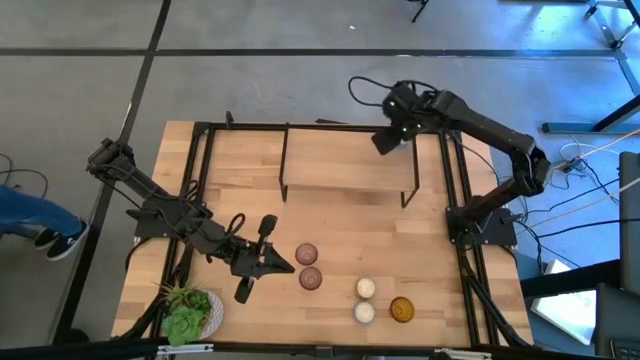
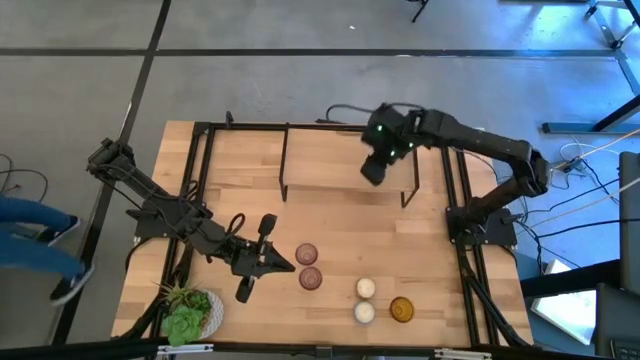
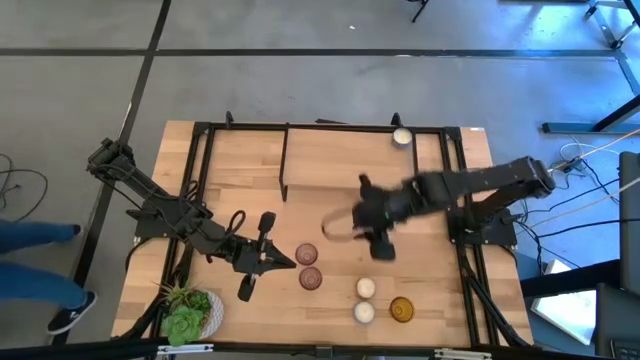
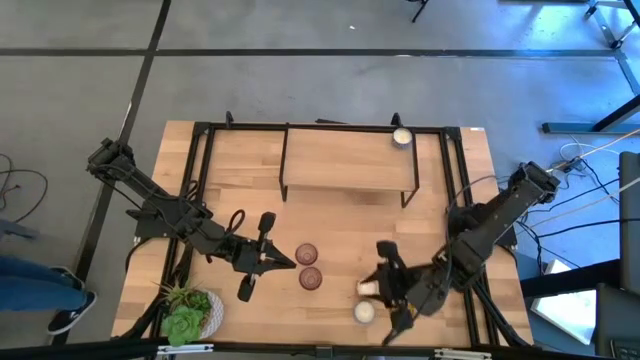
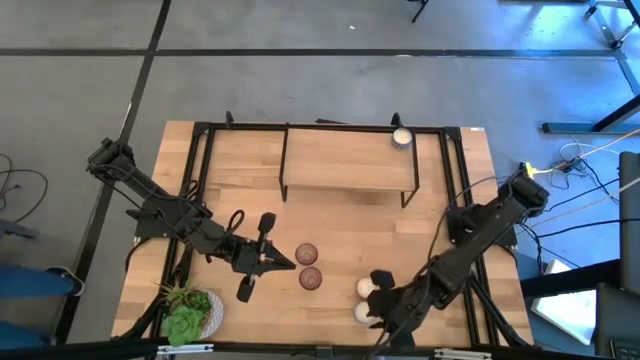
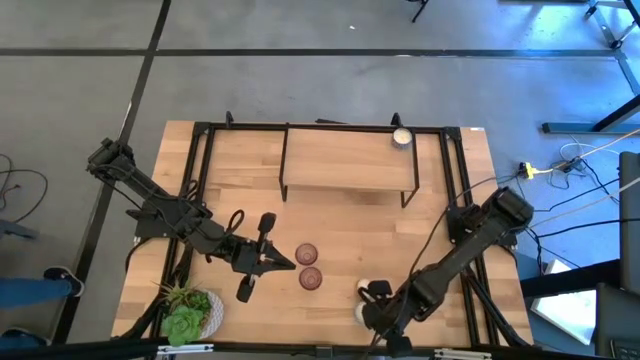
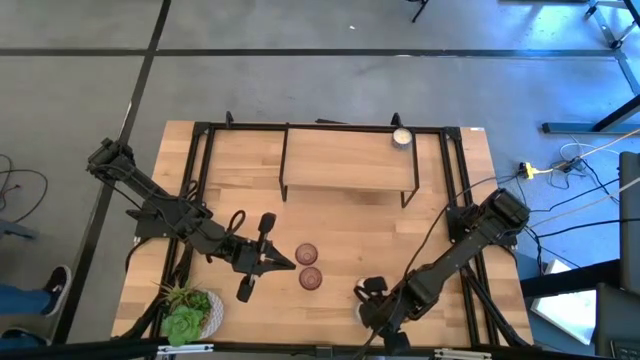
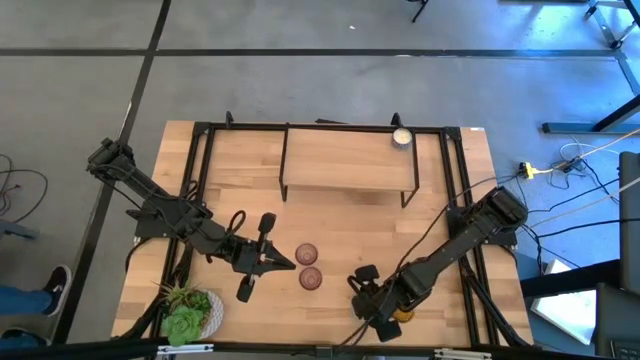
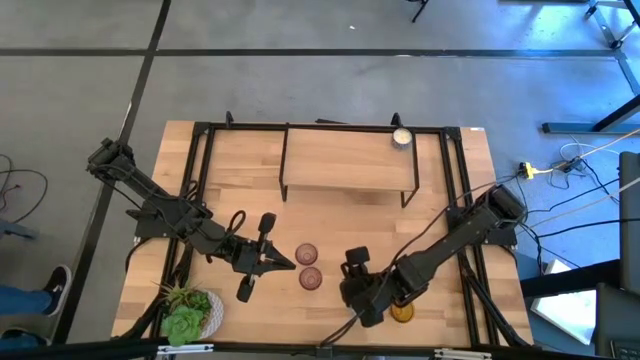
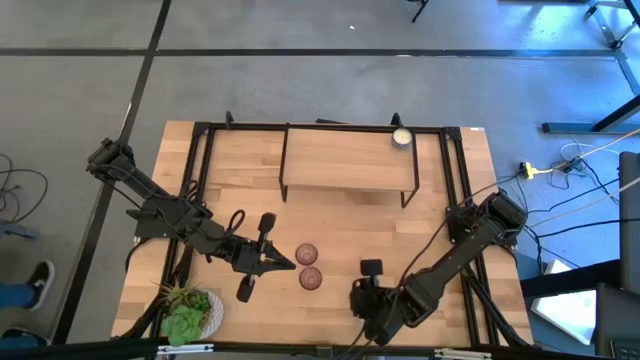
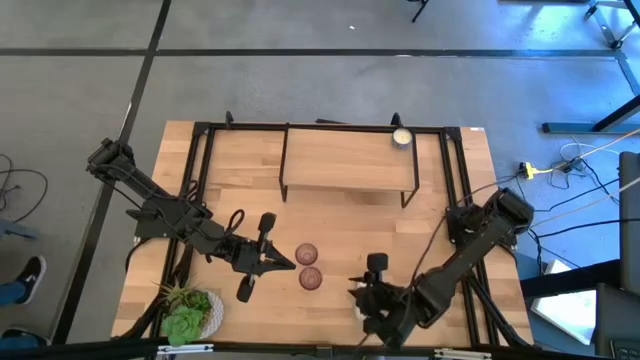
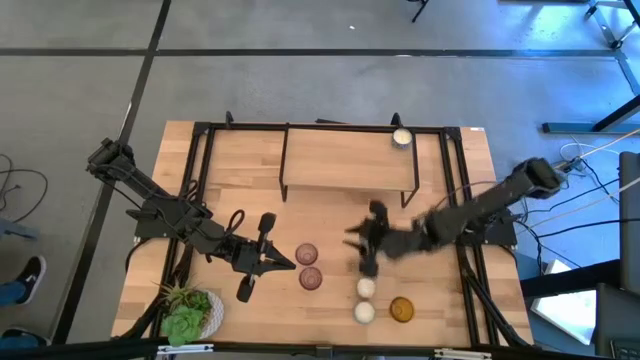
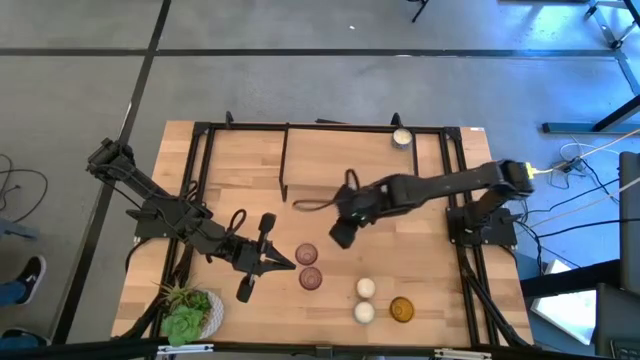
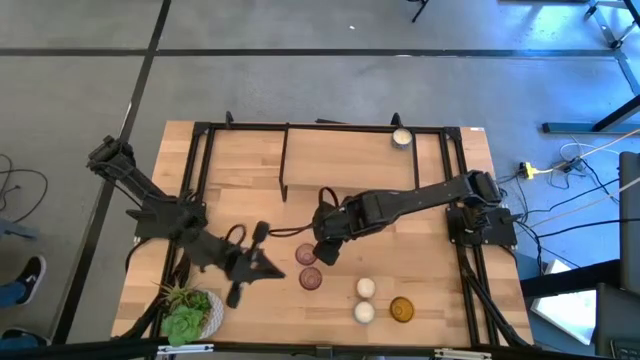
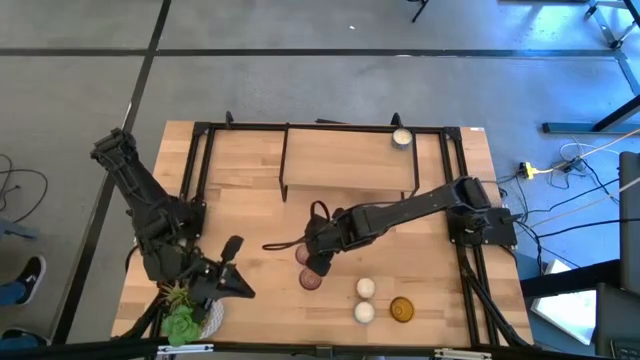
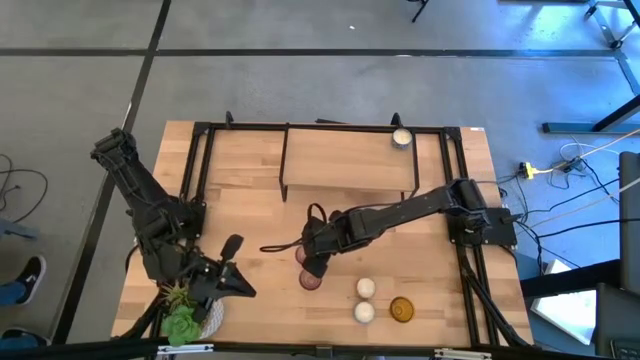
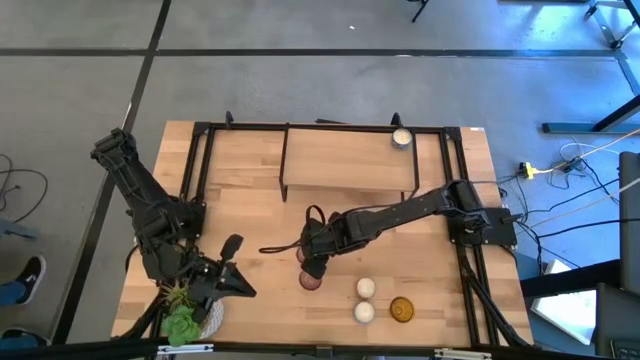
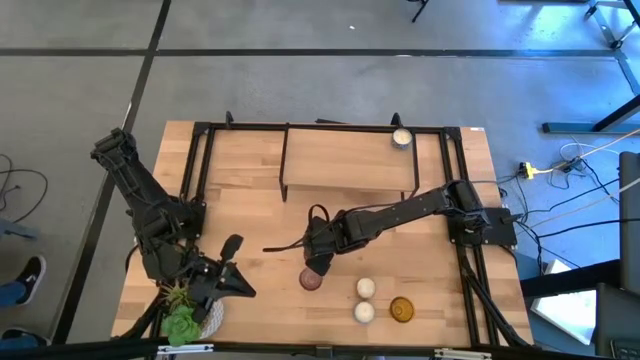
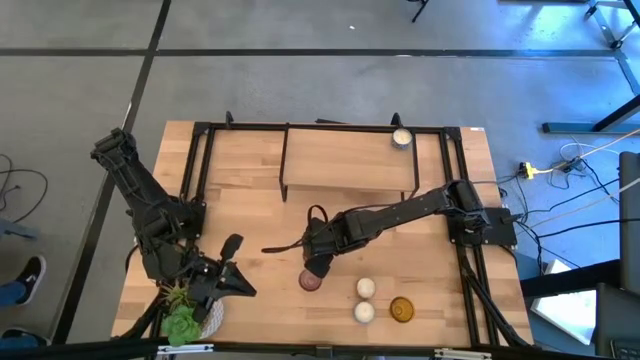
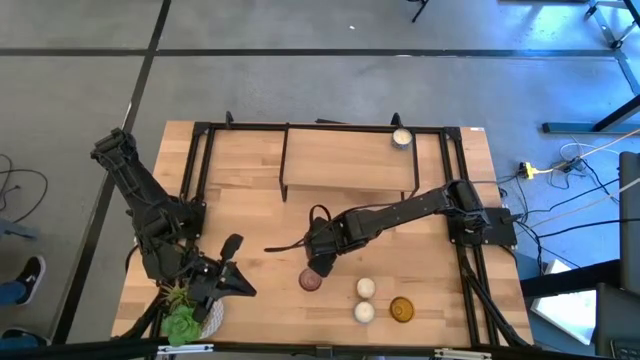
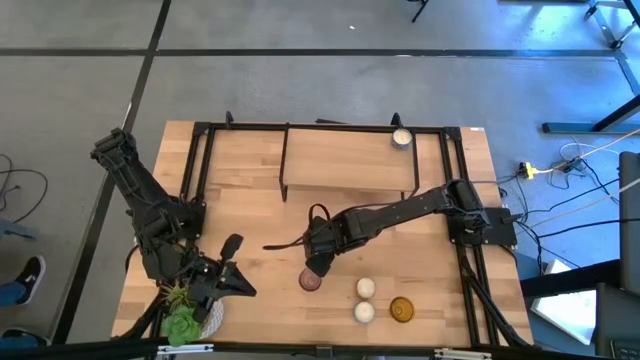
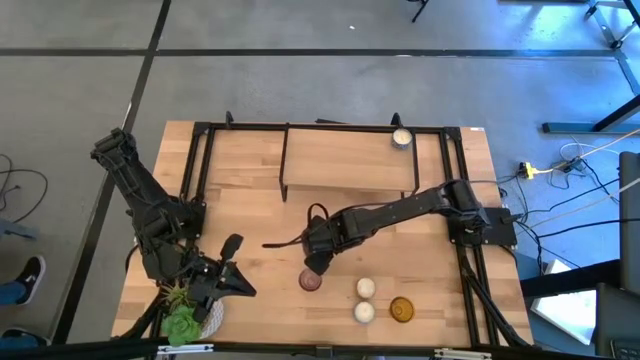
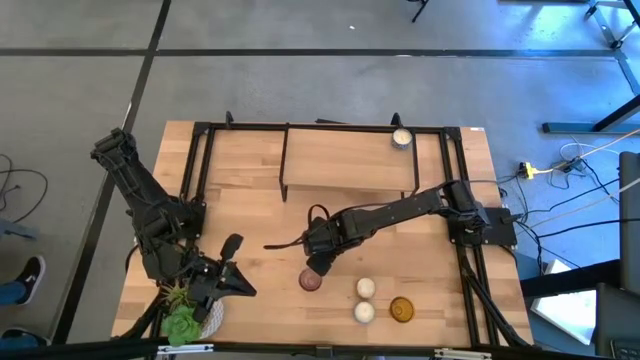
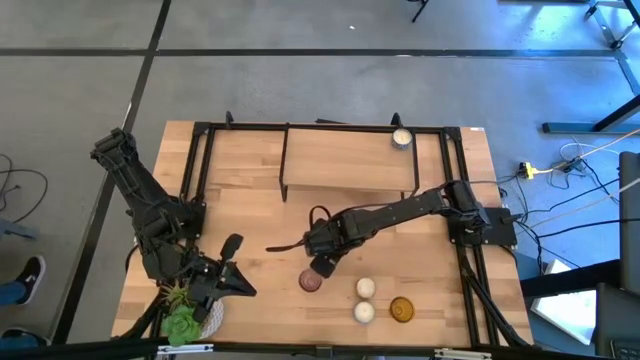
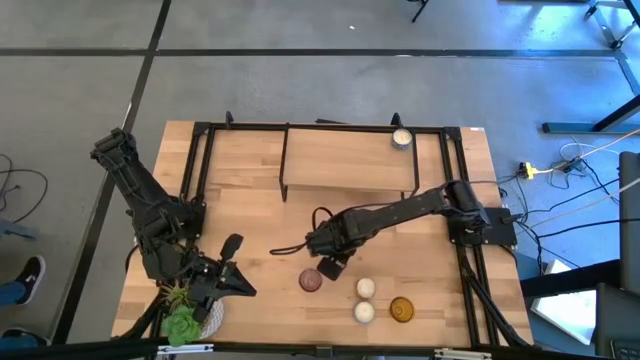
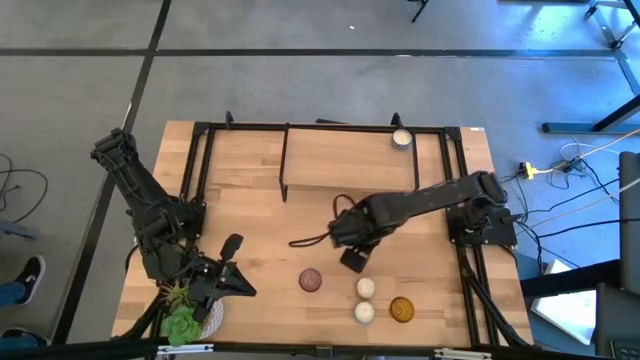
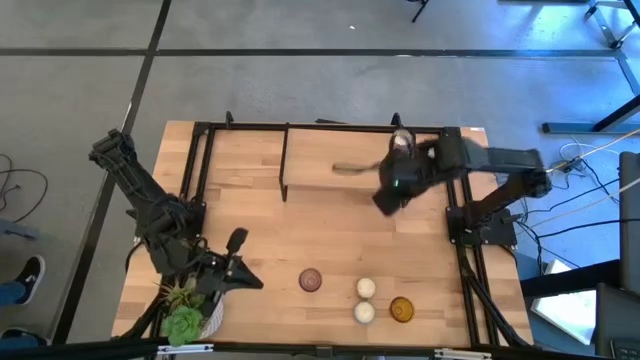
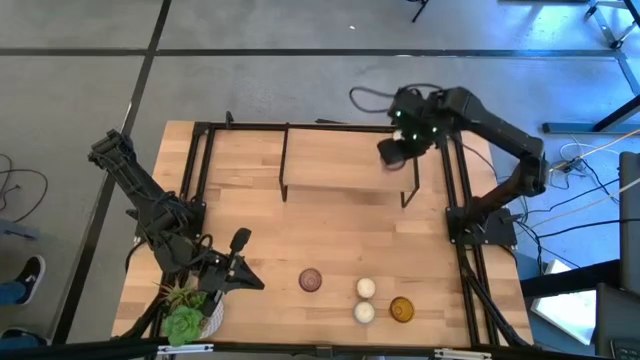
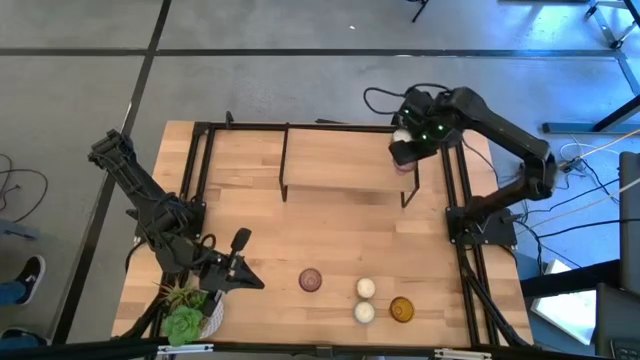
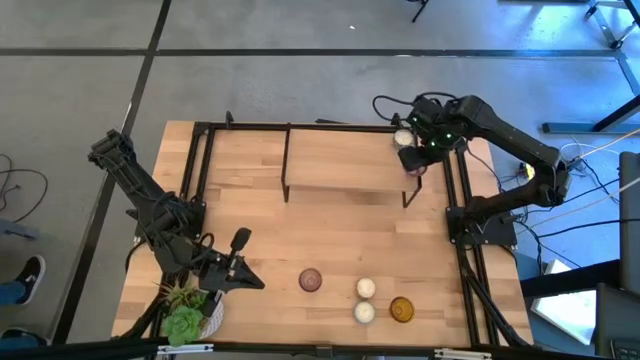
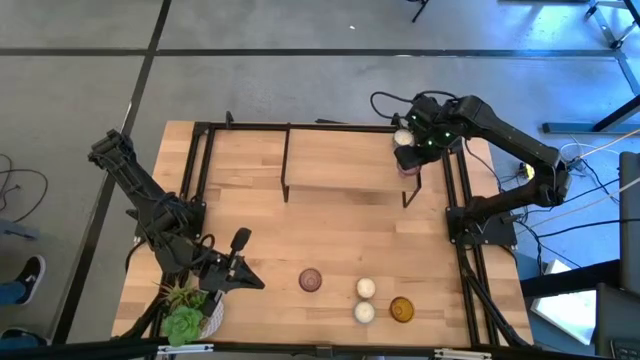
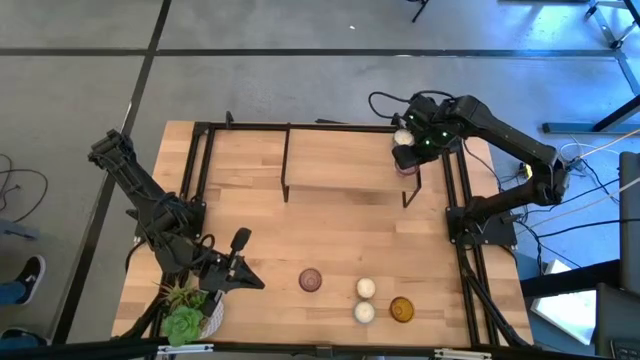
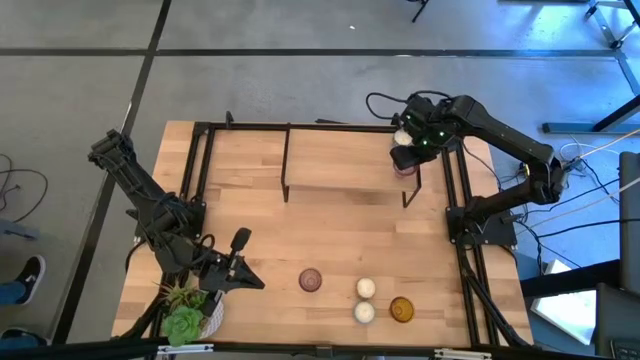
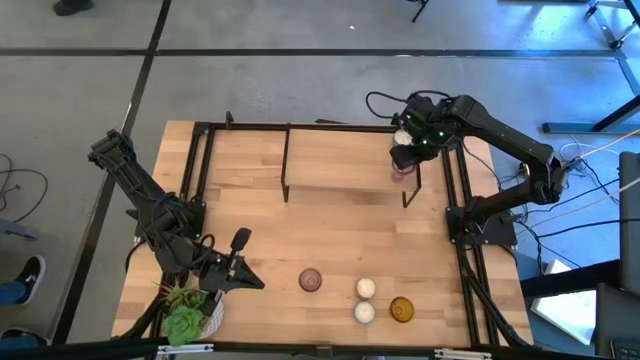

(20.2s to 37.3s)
Task: Pick & Place candle stick holders
Put the violet candle holder on the shelf aligned with the blue candle
